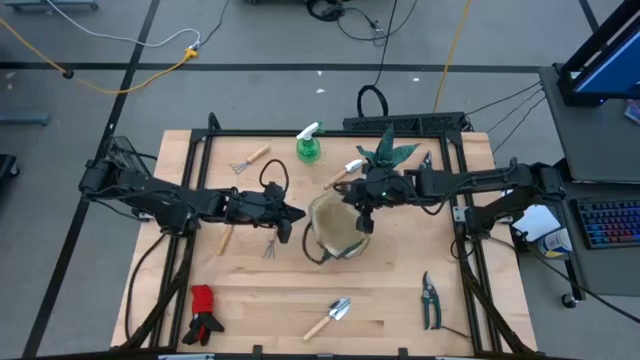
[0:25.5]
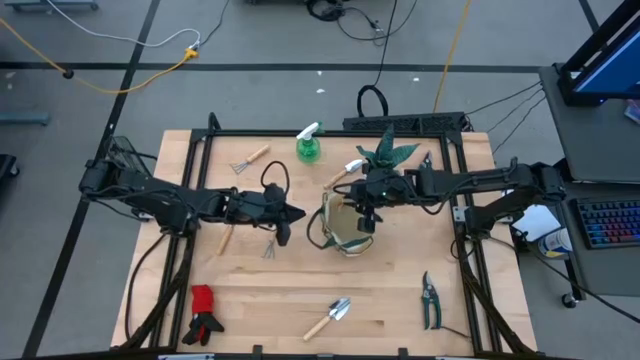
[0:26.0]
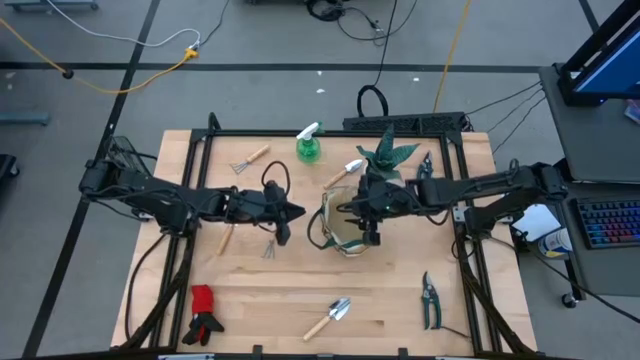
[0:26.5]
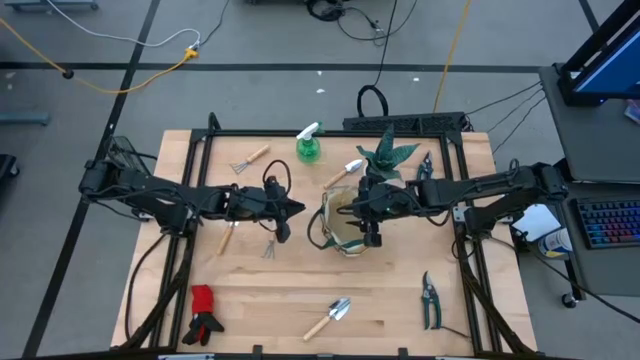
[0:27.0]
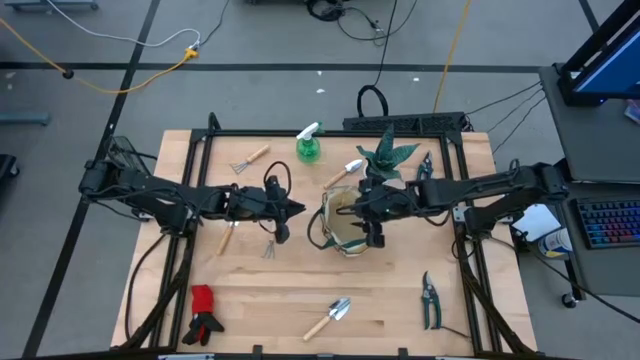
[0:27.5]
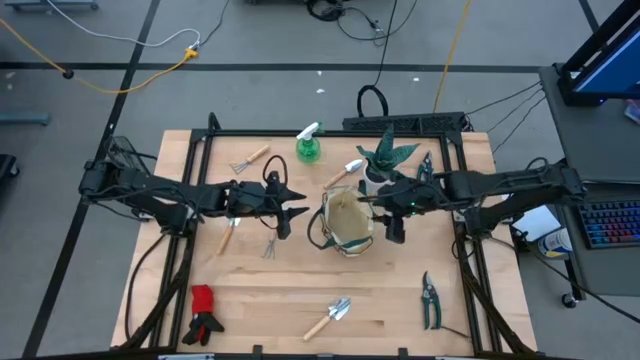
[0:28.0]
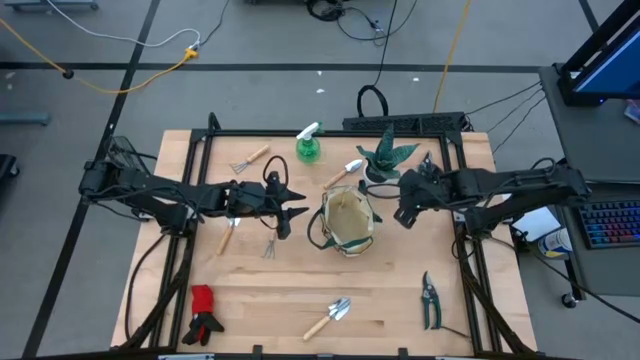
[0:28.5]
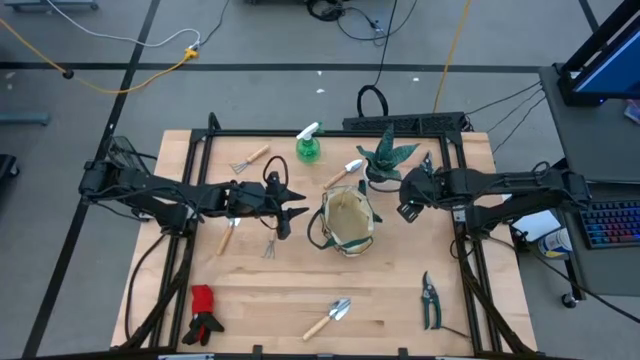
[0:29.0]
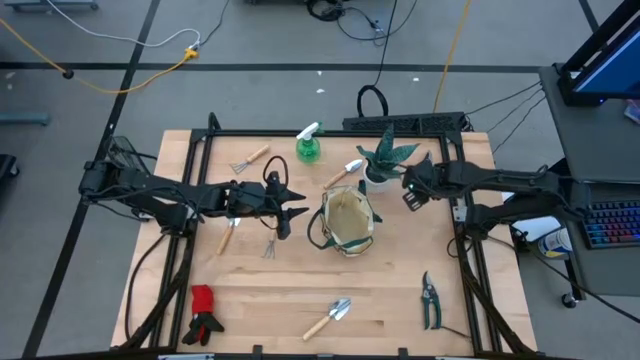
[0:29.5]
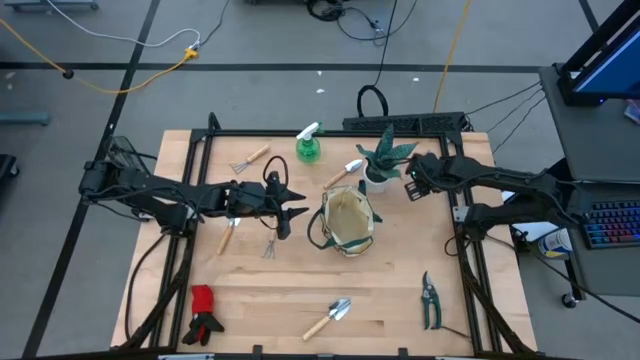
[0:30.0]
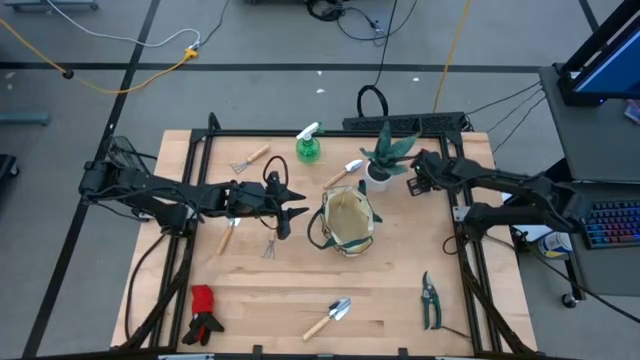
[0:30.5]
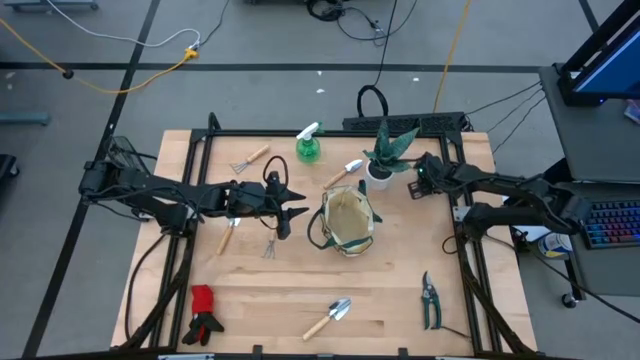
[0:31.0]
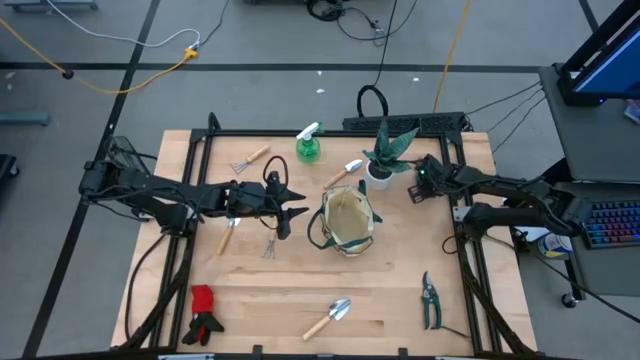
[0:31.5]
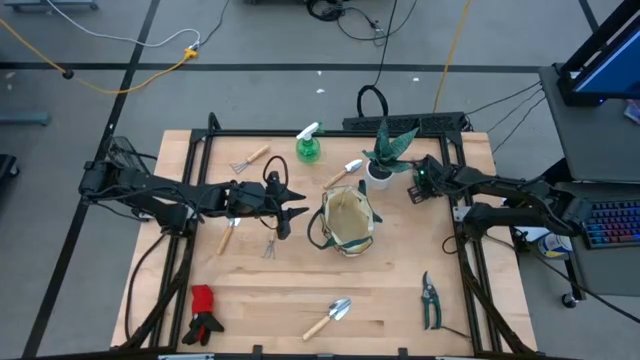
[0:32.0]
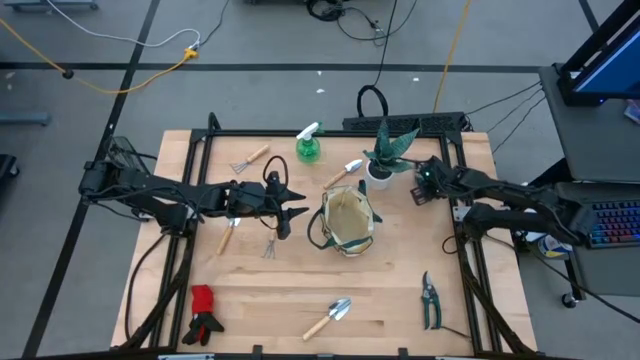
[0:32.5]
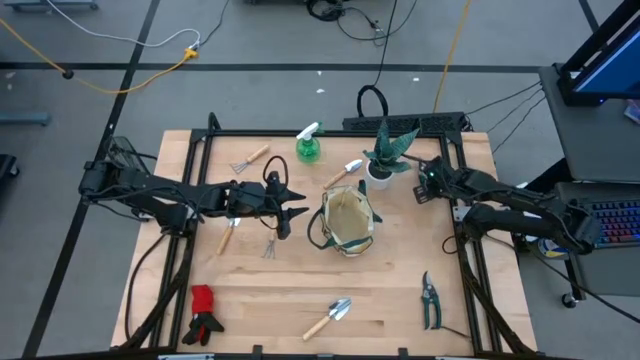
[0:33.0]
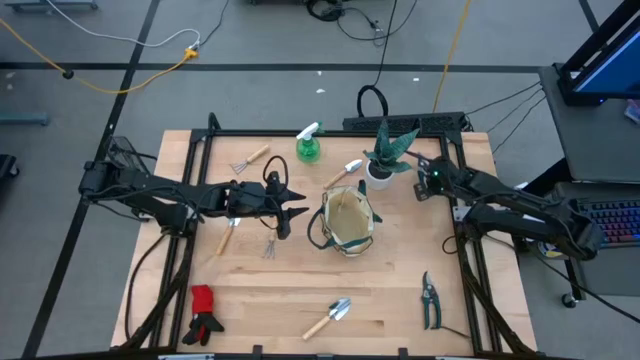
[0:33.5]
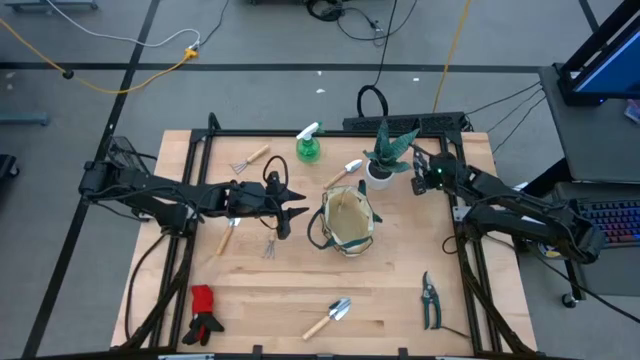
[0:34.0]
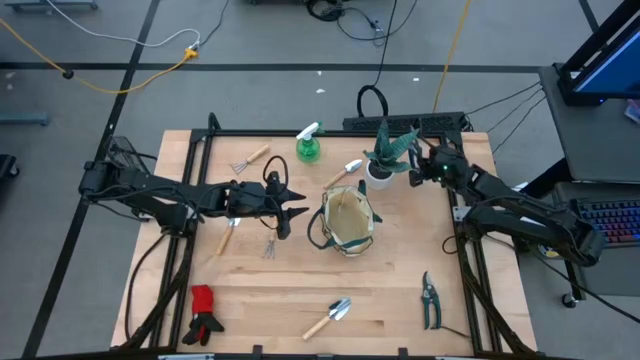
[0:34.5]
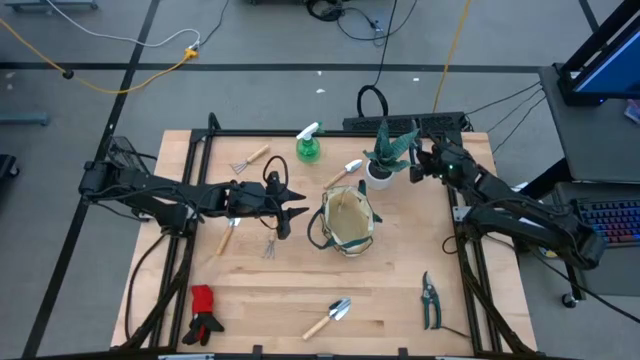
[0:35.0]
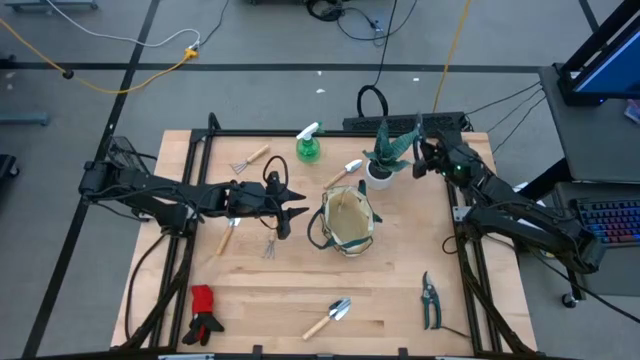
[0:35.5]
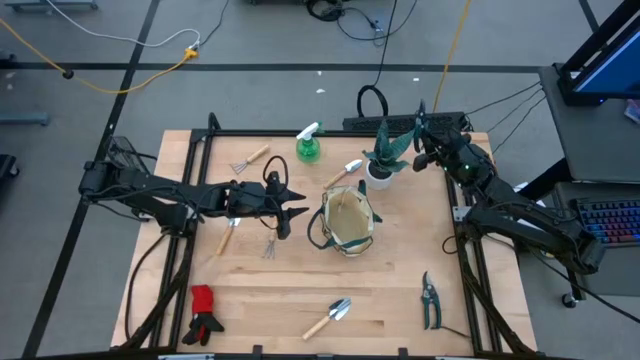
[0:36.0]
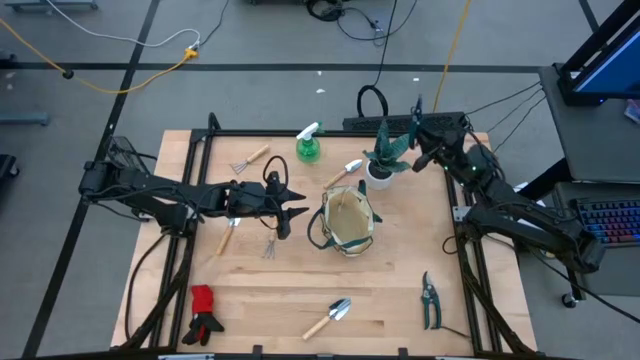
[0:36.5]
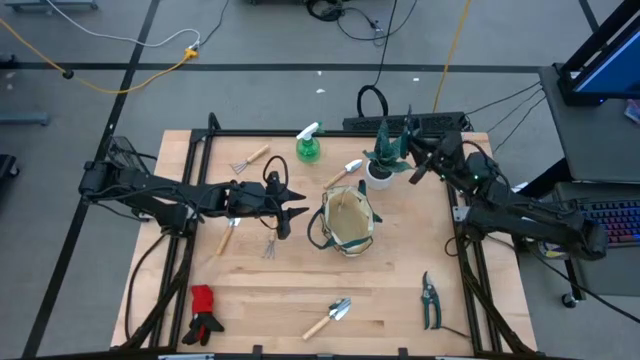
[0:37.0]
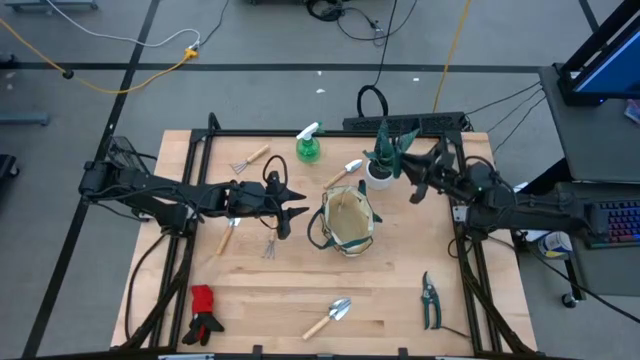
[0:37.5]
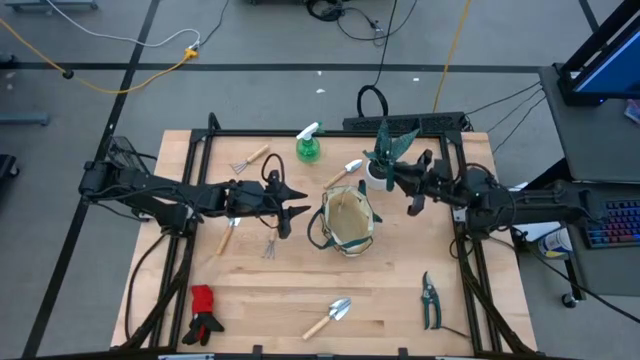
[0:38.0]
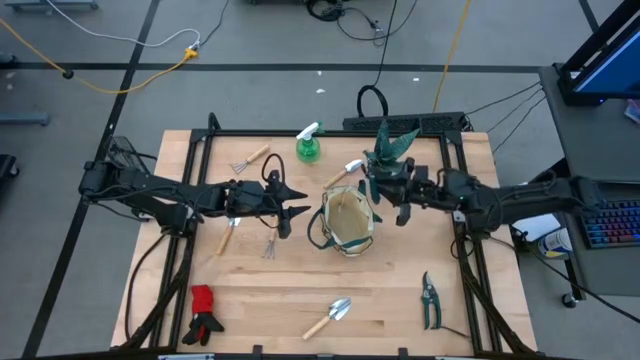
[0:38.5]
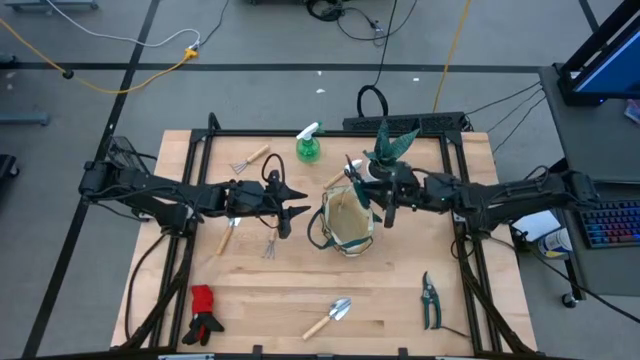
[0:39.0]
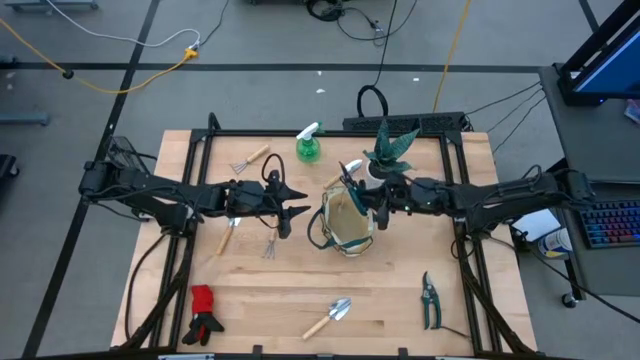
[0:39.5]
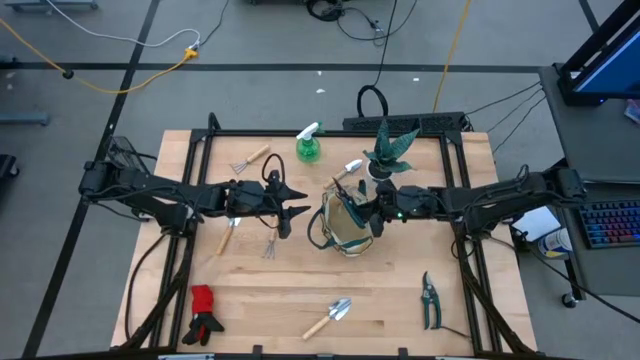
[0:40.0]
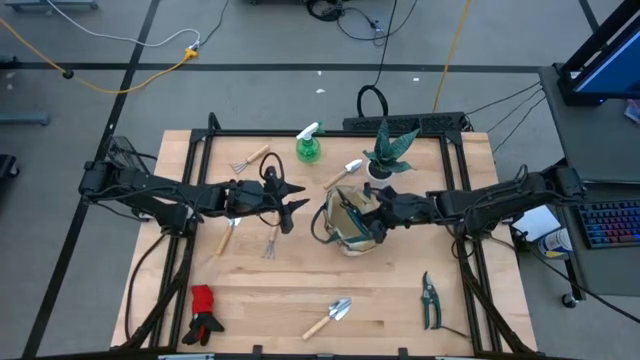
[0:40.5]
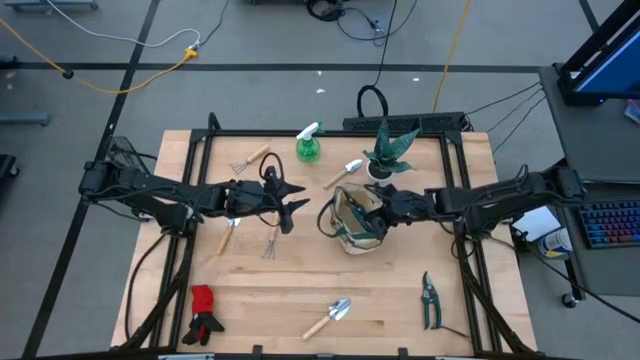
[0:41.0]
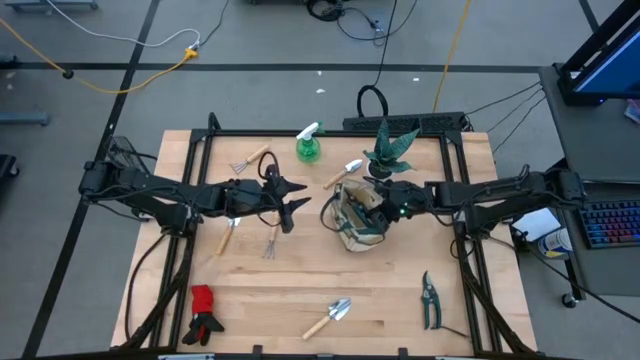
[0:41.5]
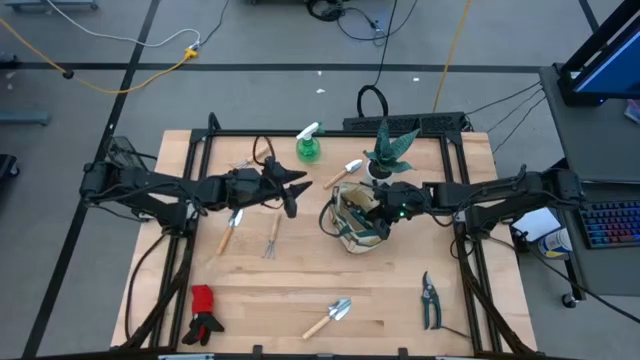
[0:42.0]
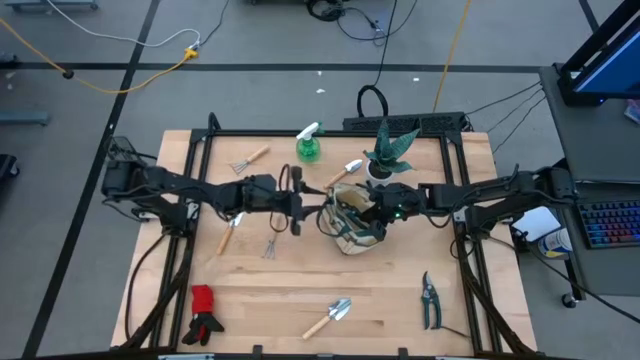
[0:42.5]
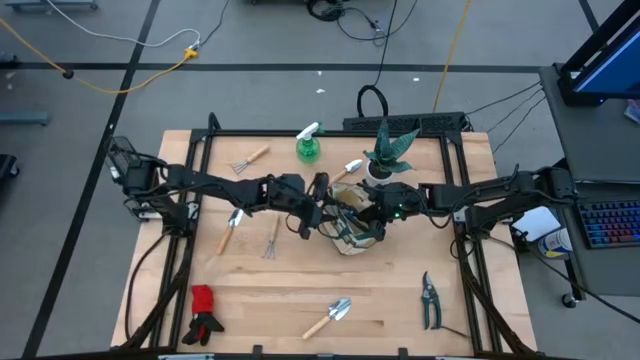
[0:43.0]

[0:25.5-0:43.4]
Task: Pick & Place Garden tools in Gardening bag
Put the top green shear scissor into the gardening bag

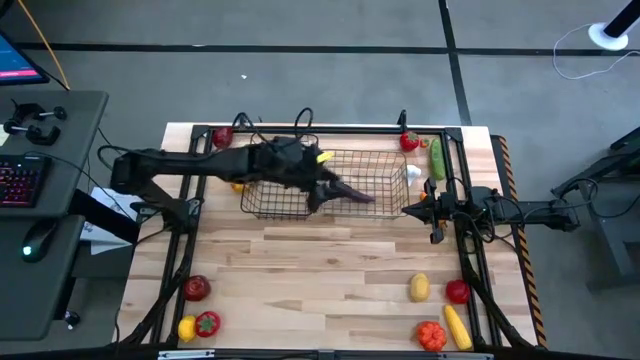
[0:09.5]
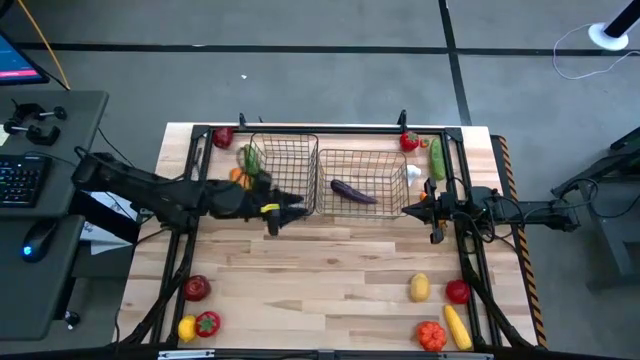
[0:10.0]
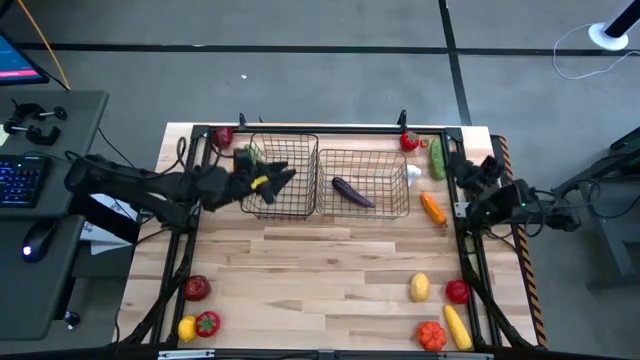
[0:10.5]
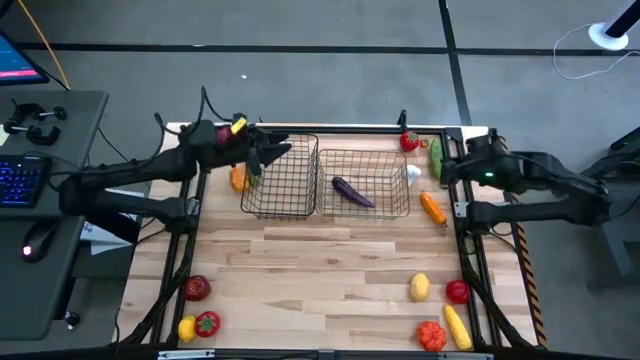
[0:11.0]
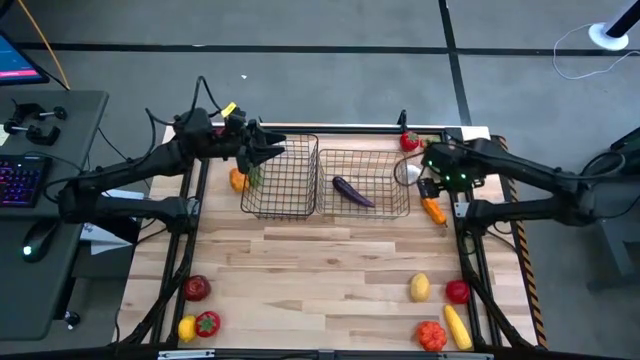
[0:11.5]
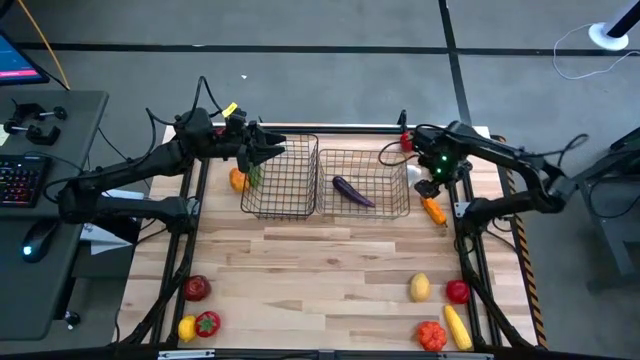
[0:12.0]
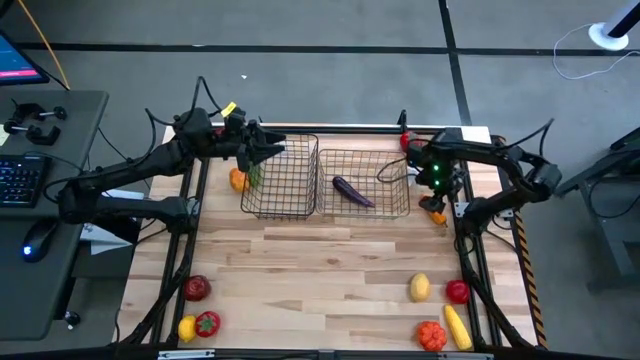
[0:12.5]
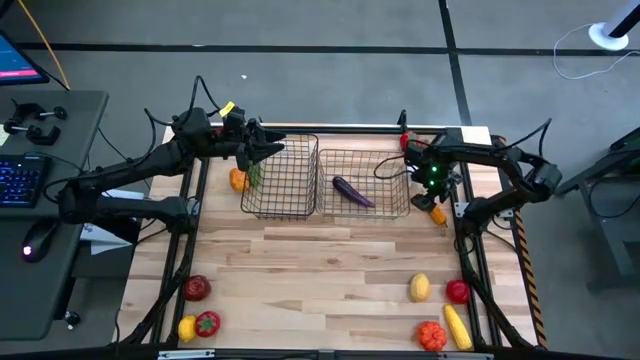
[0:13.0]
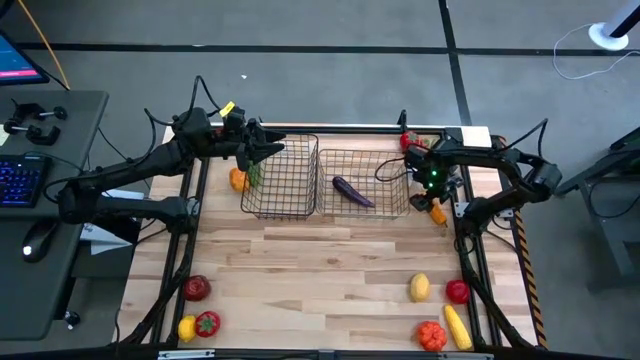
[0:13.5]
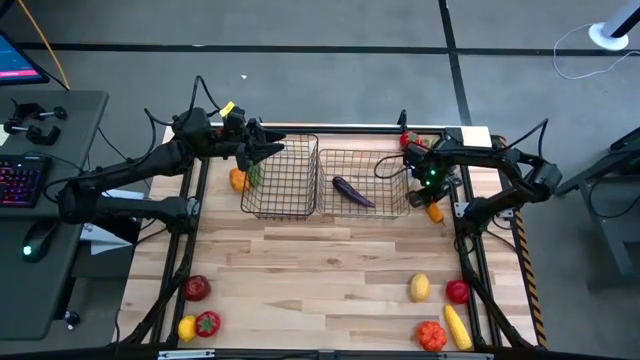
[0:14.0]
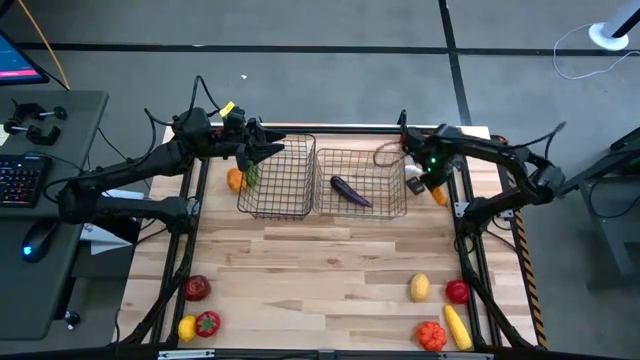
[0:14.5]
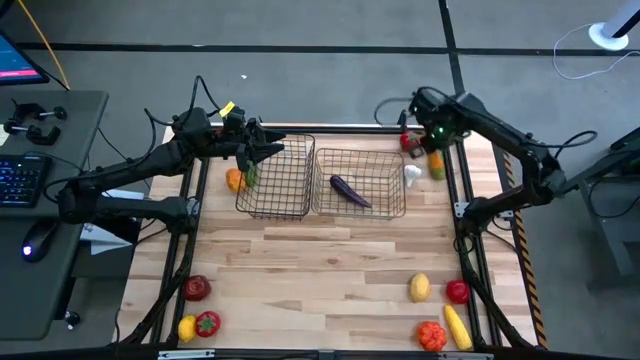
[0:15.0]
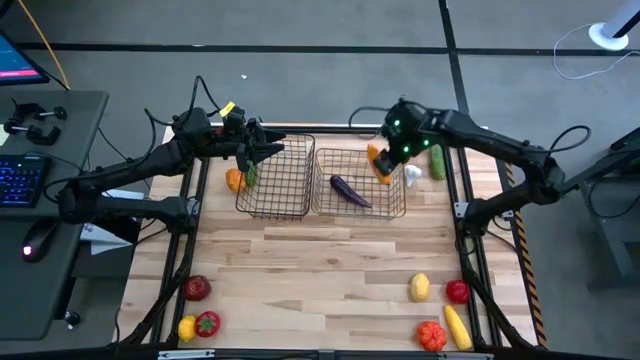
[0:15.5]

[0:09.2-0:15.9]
Task: Sort produce into baskets
Put the yellow chili pepper into the right wire basket
